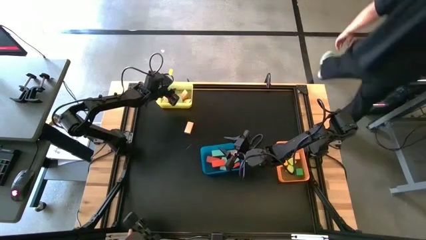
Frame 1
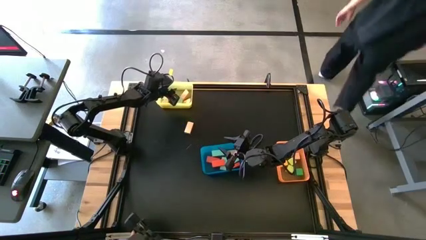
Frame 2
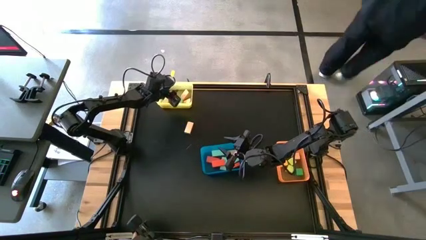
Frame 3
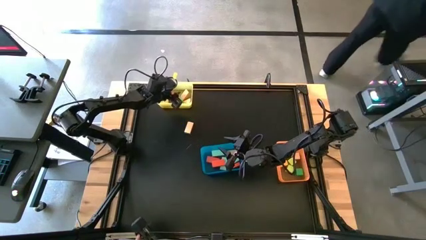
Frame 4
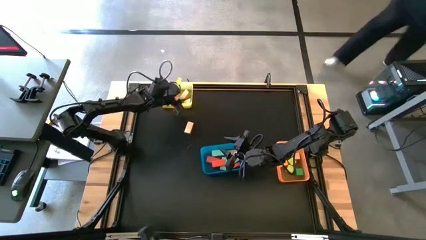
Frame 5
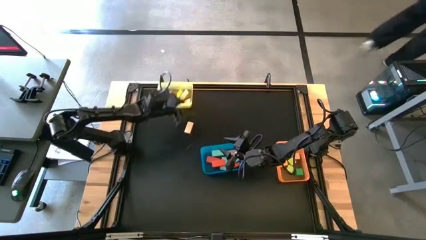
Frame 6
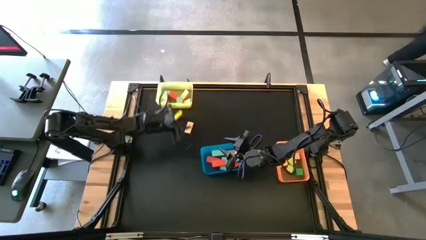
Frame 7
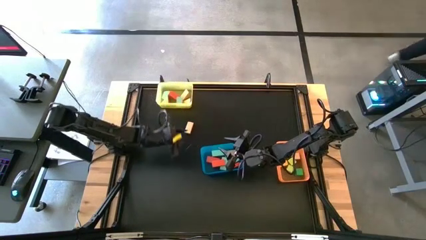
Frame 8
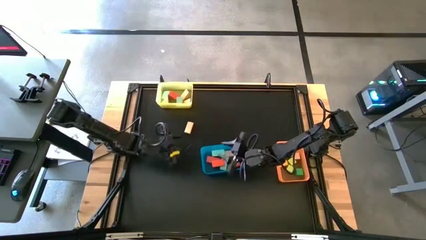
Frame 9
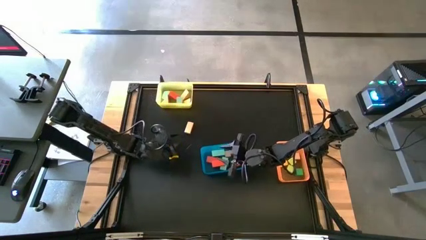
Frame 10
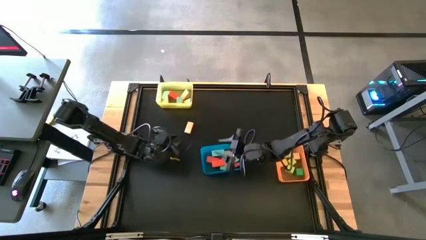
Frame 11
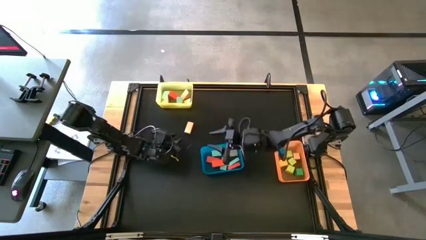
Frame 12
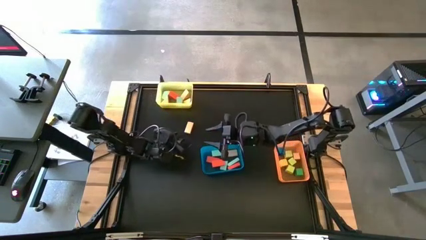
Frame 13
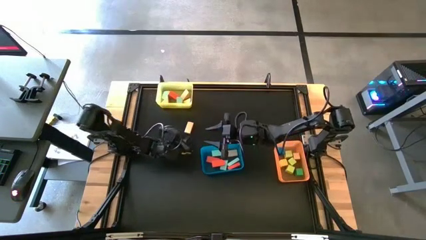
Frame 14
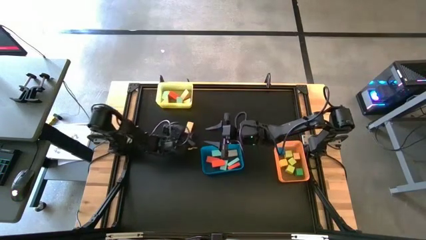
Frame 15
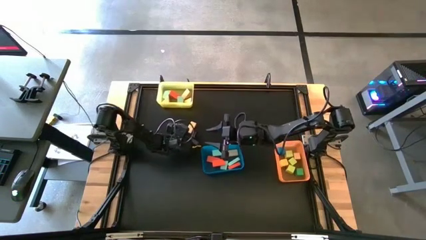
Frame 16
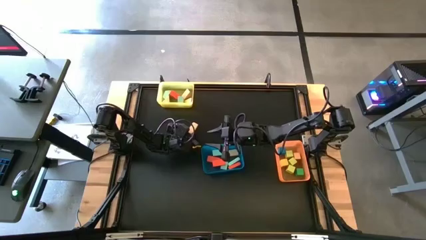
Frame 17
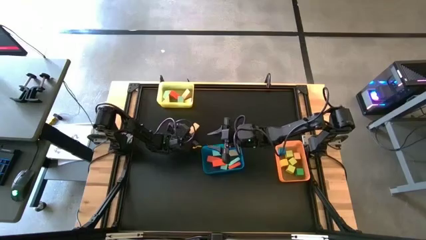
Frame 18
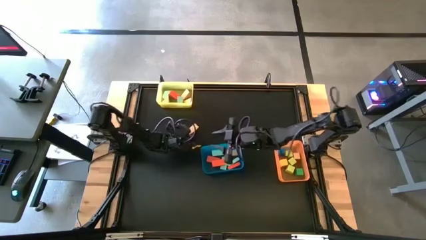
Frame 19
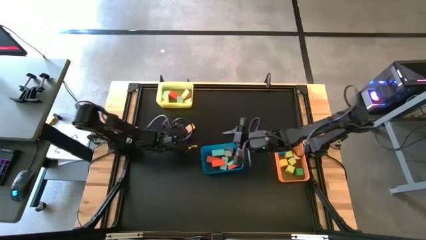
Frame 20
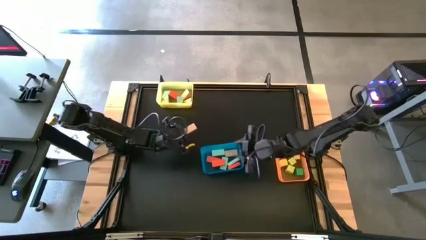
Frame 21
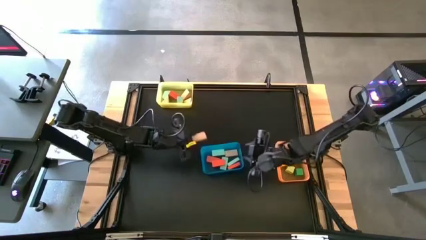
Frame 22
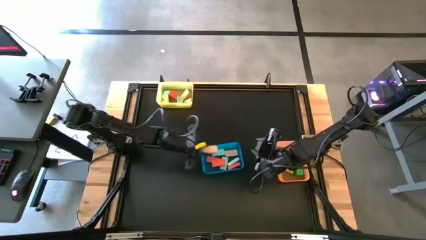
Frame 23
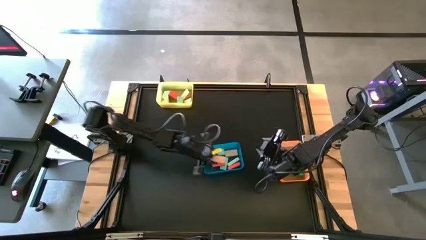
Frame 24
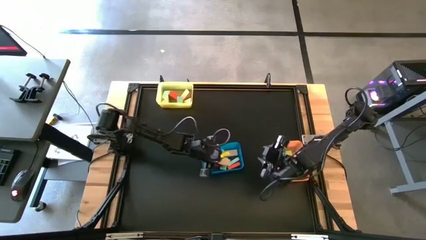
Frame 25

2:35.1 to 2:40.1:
Task: Sort blocks by size
Put the light orange rectangular block into the blue bin

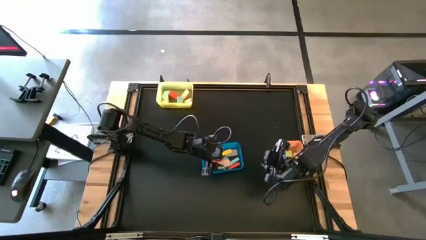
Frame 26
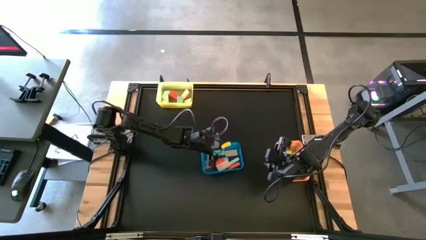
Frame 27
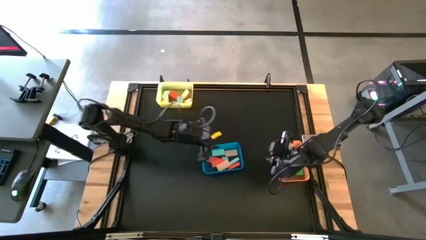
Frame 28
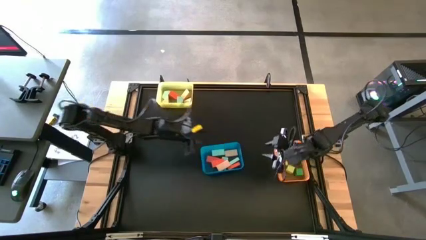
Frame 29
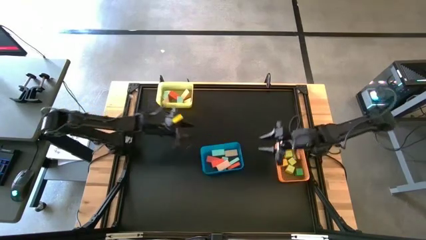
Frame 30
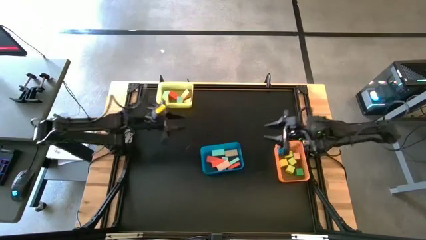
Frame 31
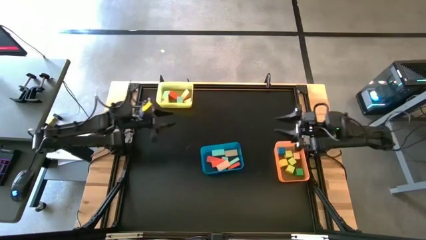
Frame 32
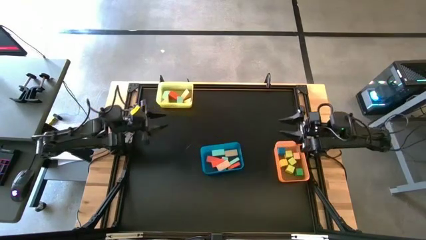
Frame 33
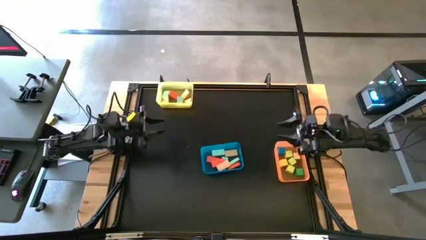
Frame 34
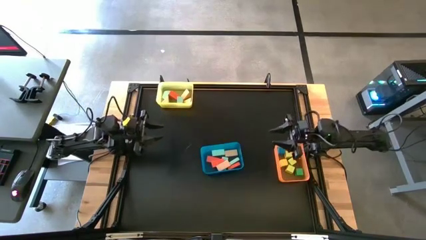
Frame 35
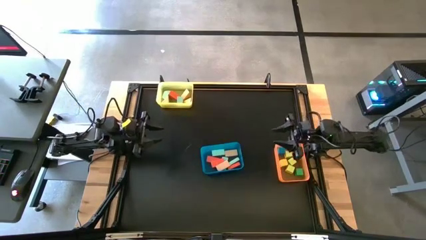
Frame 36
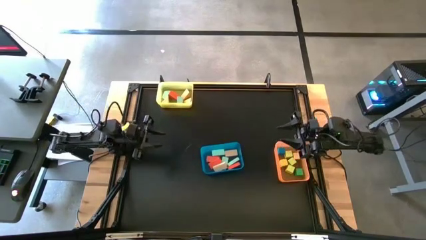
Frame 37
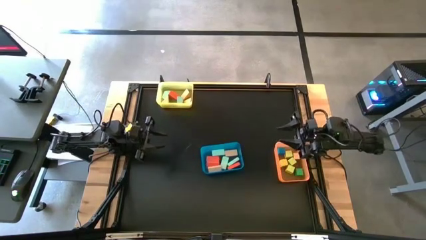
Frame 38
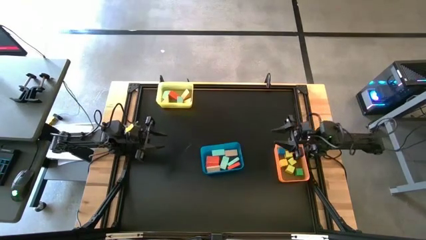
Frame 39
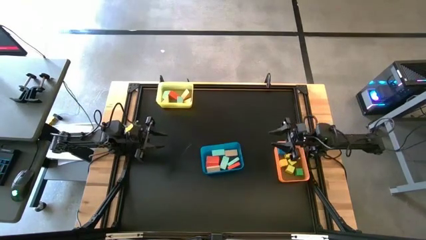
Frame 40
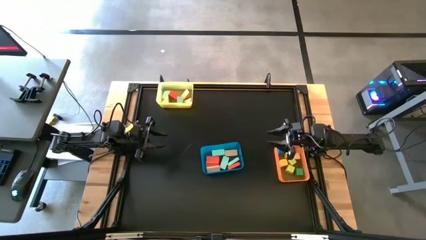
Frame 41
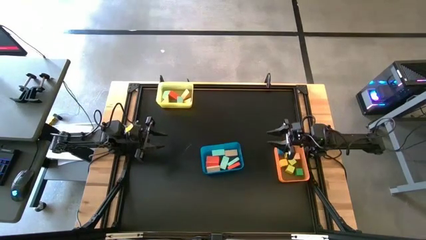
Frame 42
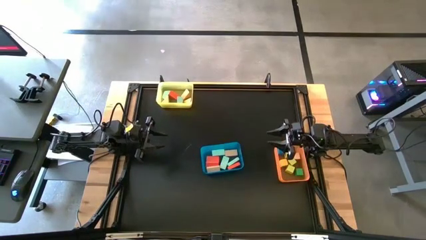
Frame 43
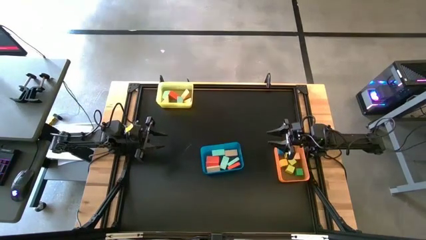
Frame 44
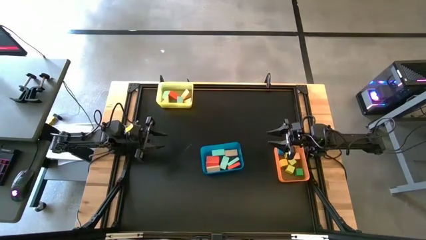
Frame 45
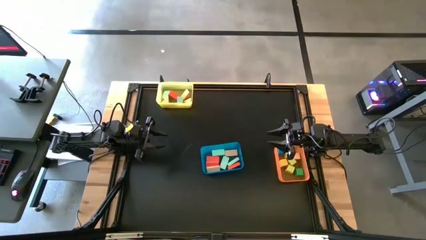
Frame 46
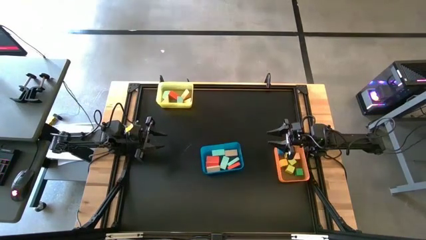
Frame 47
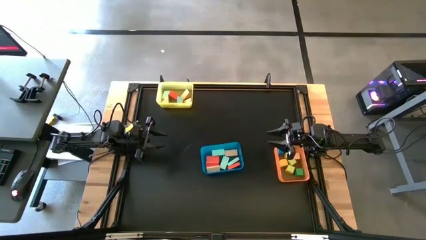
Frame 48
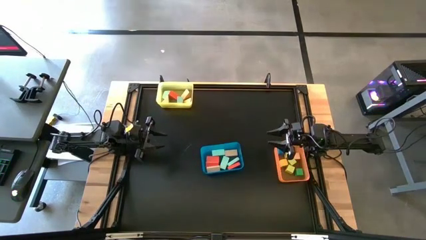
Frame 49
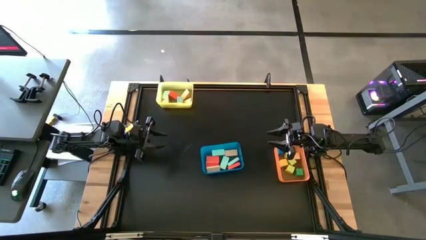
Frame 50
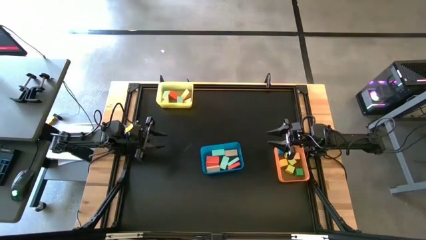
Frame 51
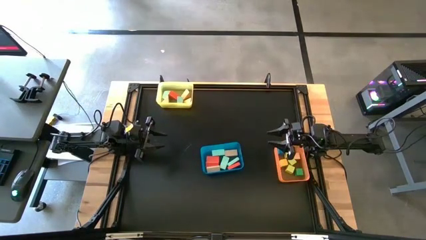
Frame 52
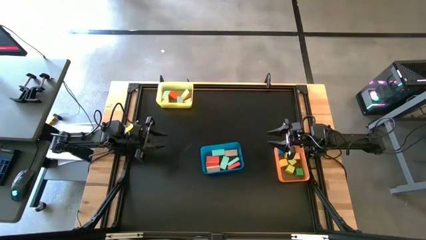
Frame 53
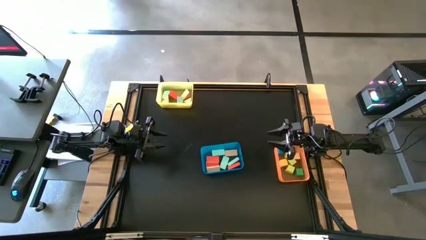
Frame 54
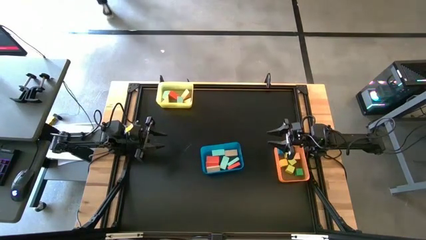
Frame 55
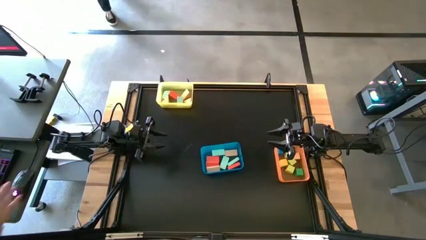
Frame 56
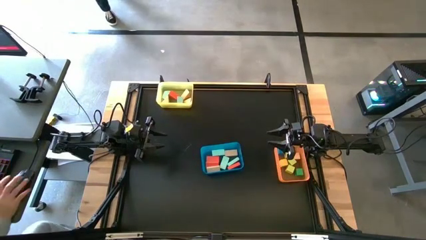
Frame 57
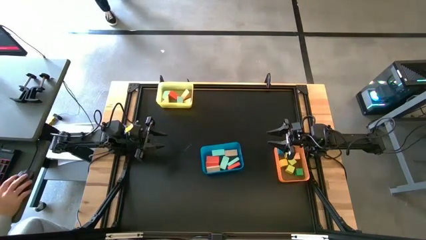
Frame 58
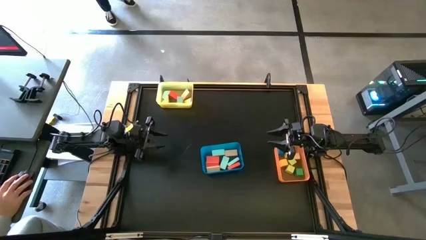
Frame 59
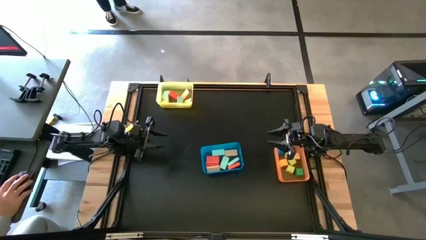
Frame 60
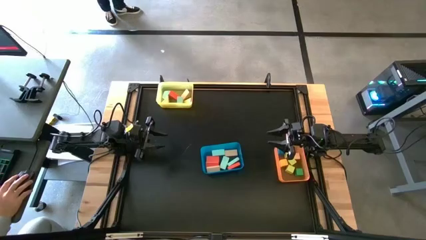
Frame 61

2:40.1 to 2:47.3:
Return to Home Position

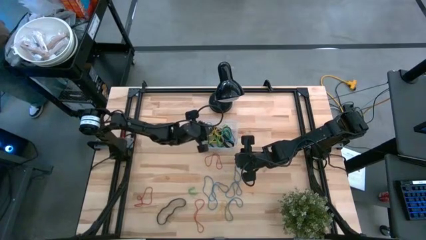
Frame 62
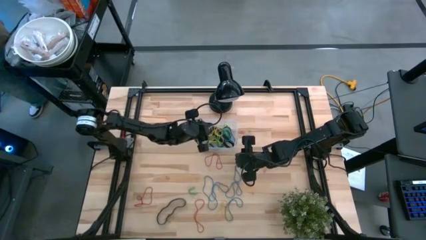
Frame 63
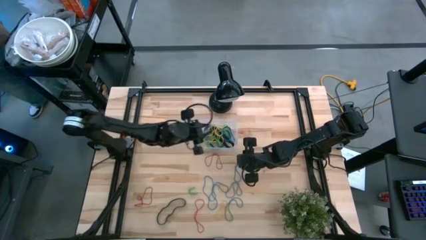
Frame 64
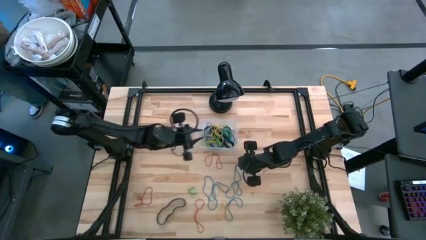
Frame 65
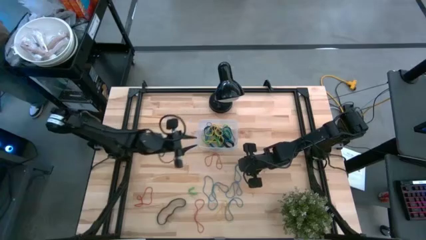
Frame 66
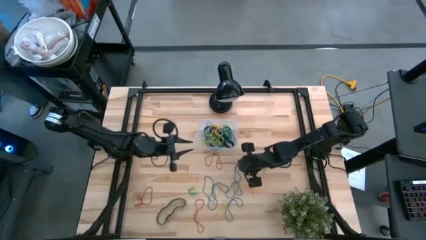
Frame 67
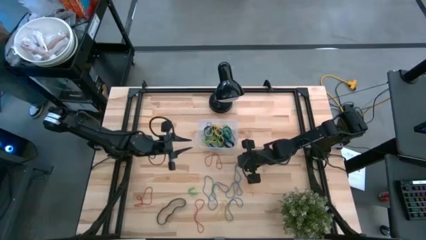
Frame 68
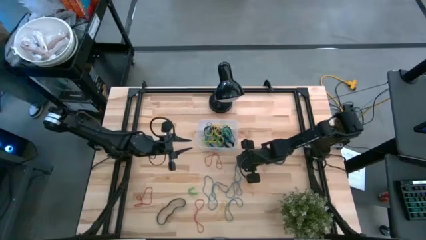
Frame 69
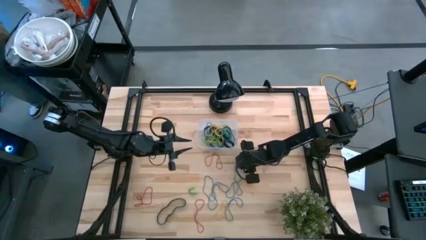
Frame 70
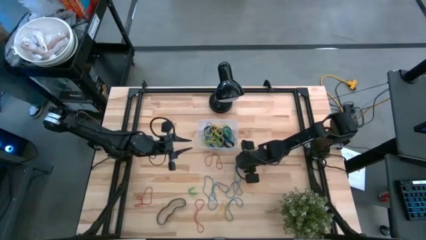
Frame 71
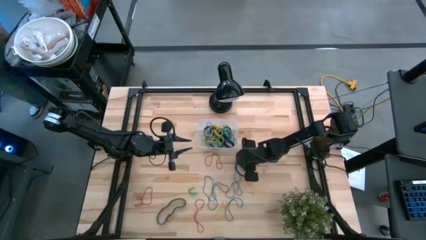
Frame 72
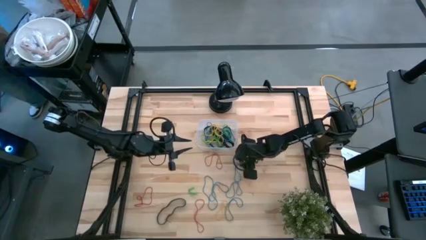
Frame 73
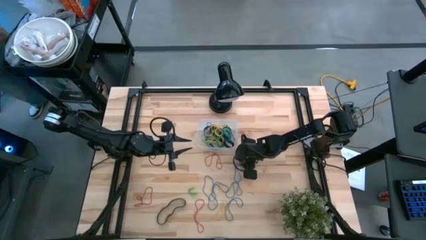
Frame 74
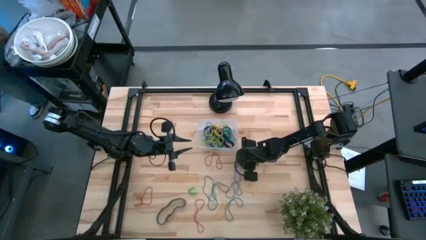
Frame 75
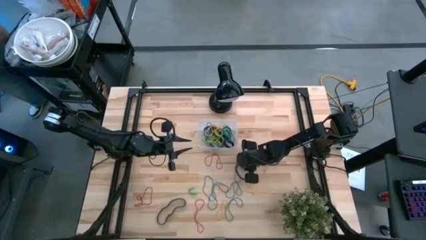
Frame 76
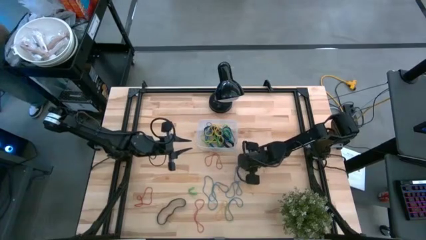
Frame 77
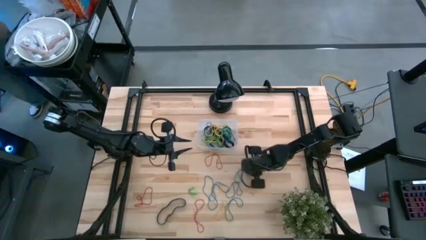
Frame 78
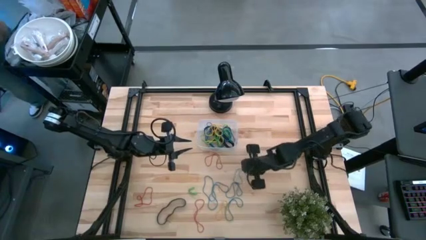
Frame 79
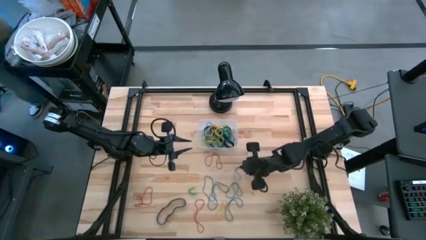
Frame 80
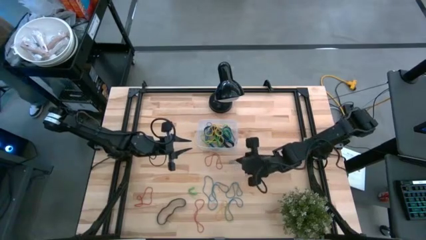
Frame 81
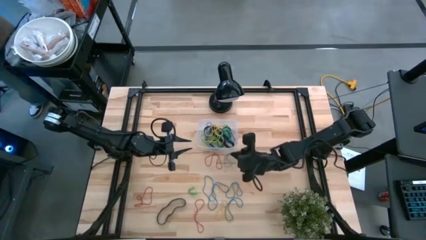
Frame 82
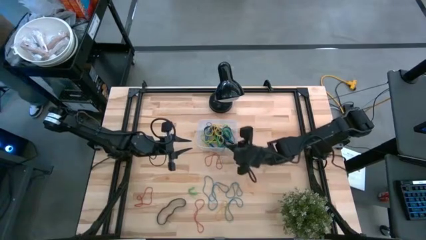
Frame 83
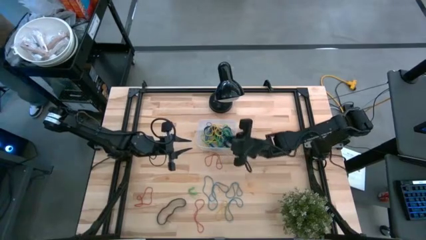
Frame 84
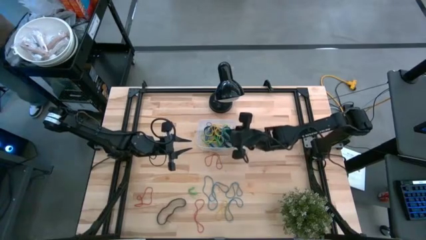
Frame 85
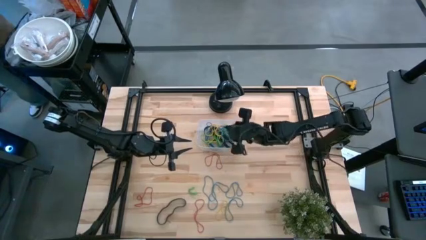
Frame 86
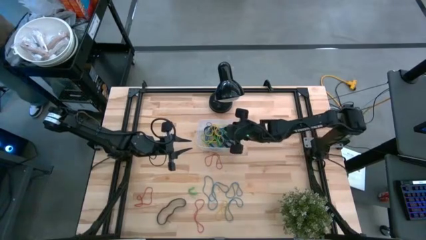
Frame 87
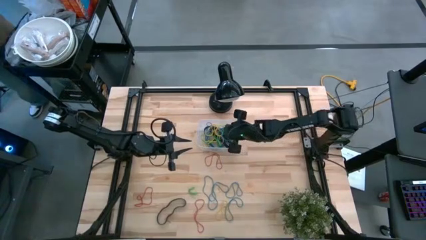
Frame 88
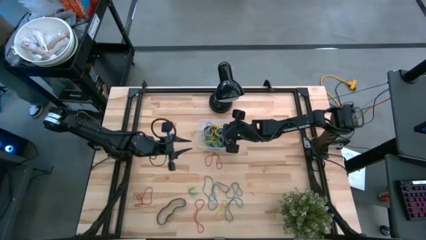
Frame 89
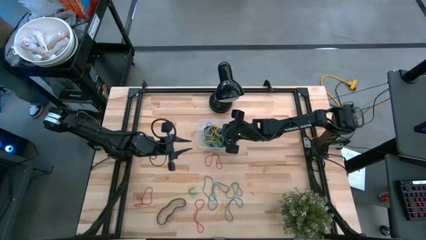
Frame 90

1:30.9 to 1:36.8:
Task: Pick and place rubber bands into bin
Put the blue rubber band into the transparent bin
